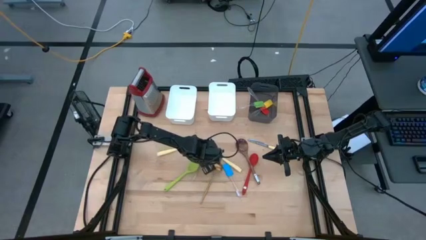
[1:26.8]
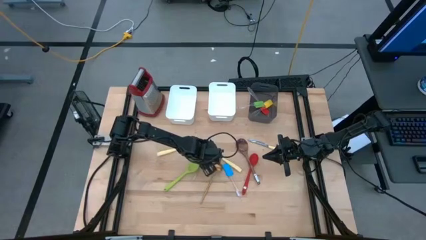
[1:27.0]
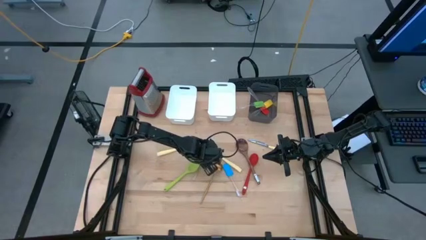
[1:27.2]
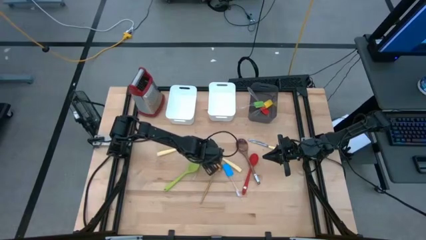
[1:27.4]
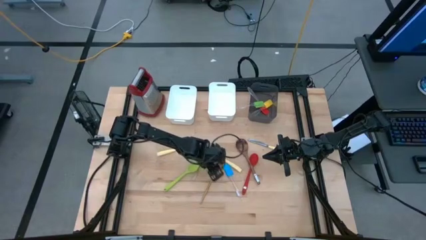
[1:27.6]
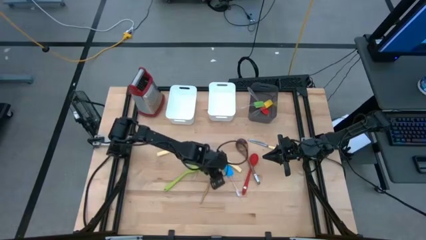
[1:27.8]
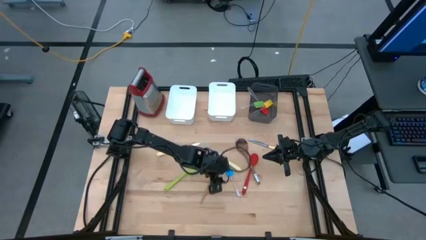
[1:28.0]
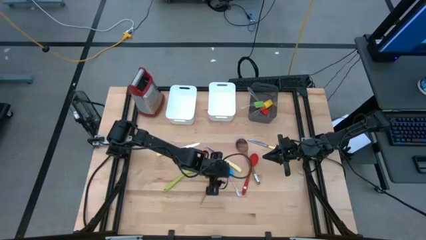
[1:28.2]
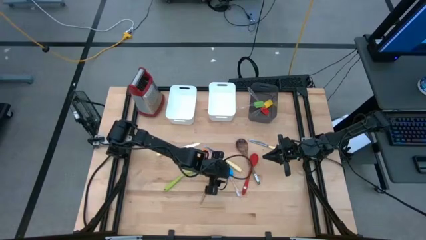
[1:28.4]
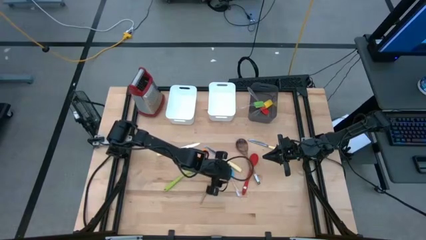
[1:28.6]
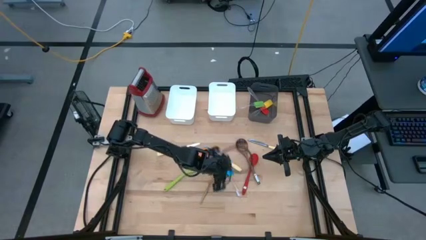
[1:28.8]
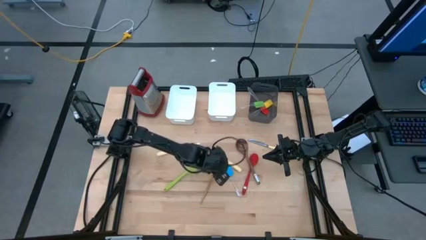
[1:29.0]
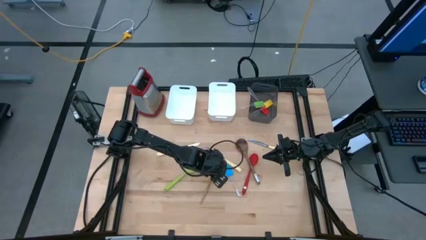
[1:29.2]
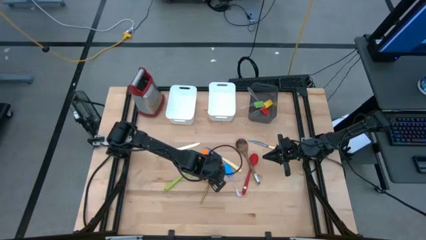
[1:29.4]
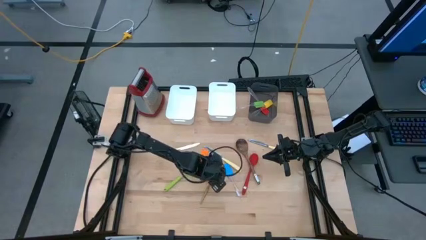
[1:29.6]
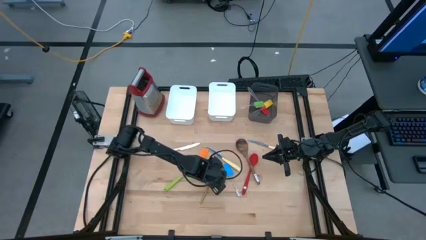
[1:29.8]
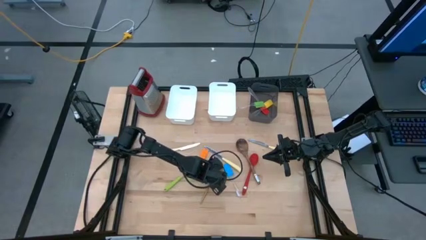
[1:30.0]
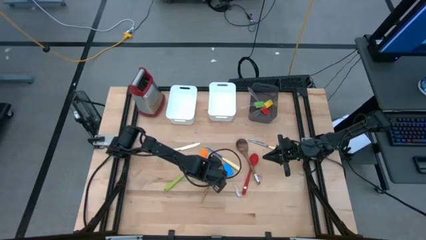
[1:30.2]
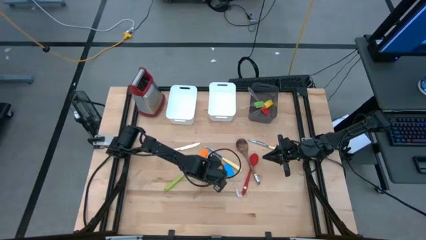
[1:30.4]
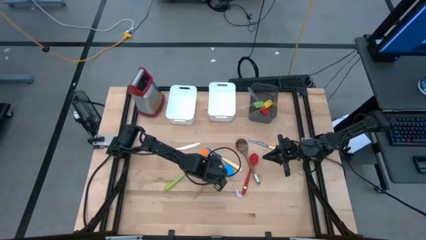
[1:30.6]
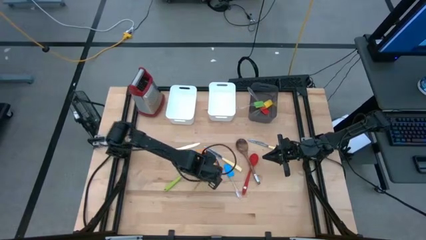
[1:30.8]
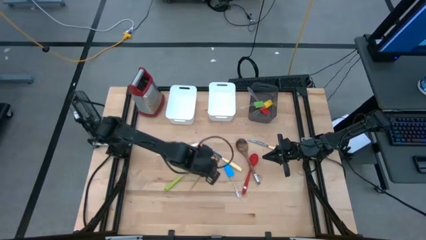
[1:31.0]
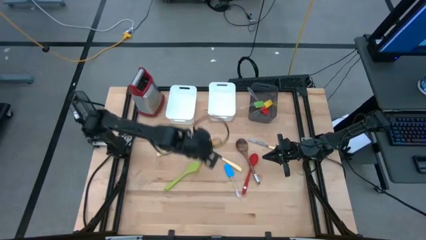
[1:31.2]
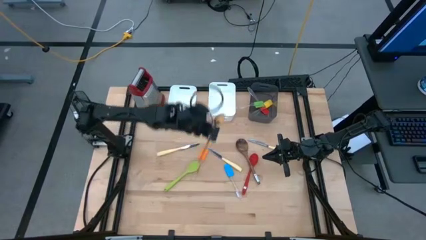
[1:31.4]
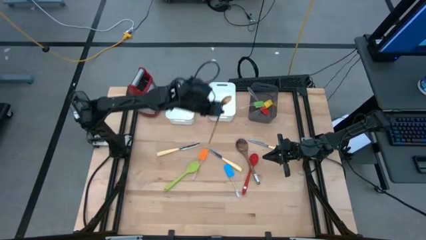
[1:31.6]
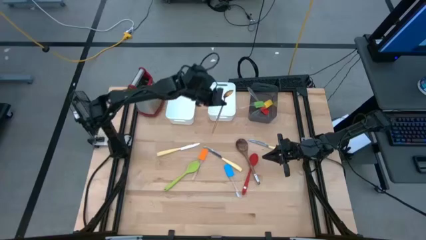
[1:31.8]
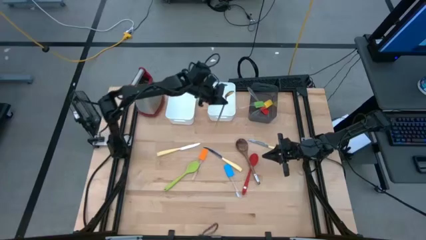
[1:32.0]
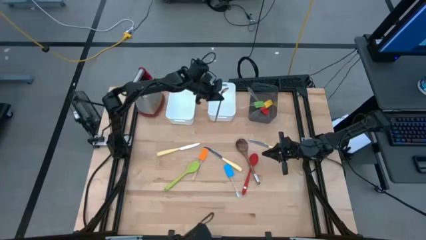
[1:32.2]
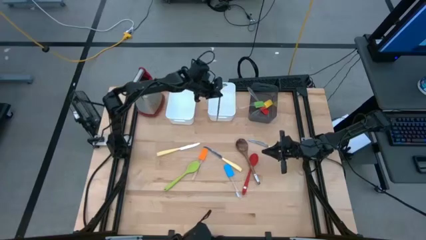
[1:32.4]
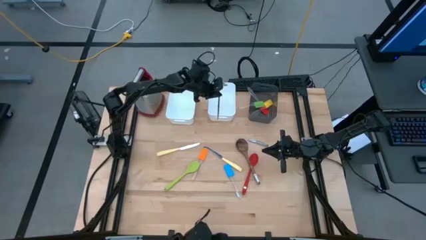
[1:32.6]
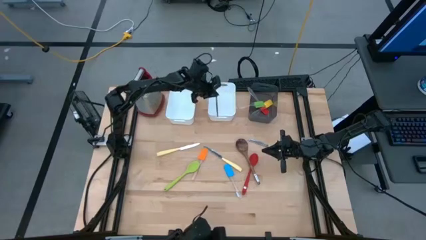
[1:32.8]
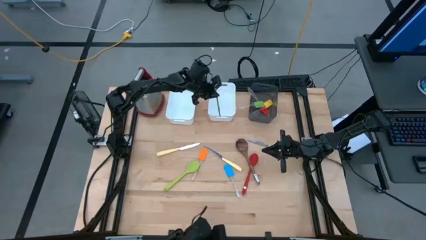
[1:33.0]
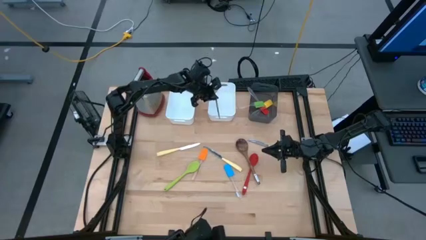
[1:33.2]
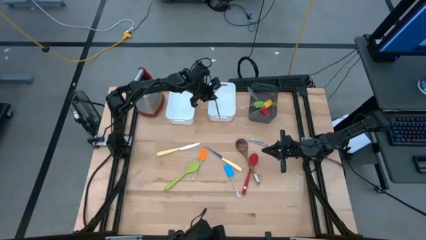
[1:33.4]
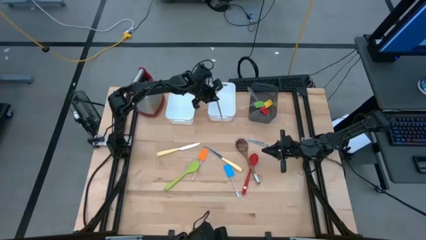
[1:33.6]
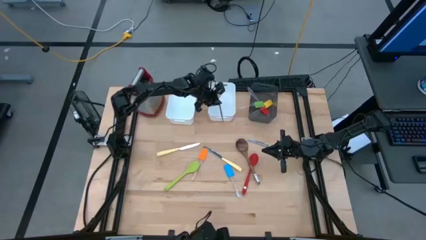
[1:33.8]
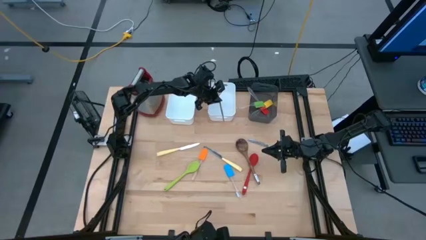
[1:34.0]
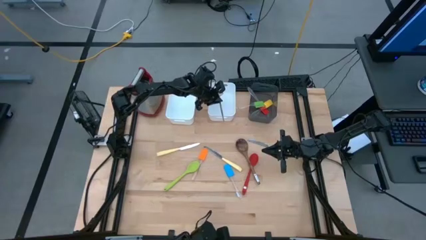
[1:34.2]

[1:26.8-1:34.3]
Task: Pick & Place Kitchen Items
Put the gold serving spoon into the right white bin

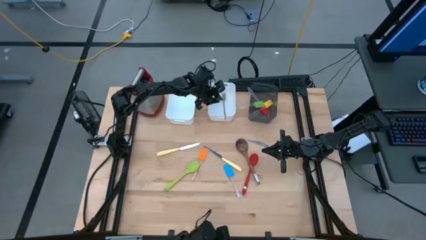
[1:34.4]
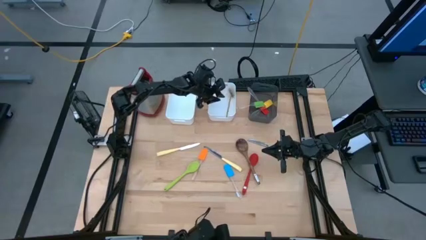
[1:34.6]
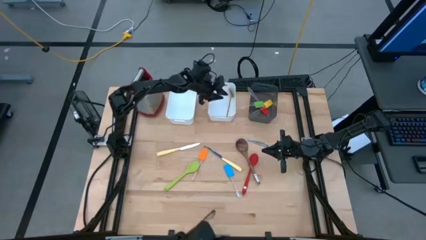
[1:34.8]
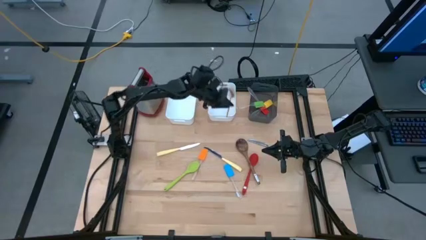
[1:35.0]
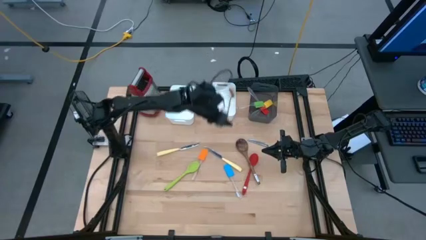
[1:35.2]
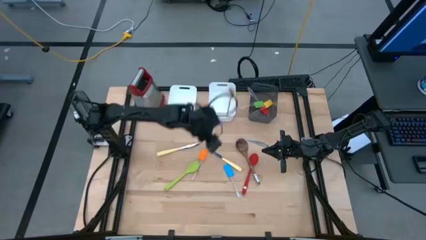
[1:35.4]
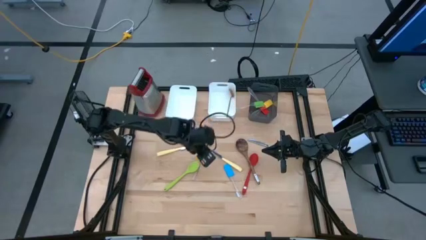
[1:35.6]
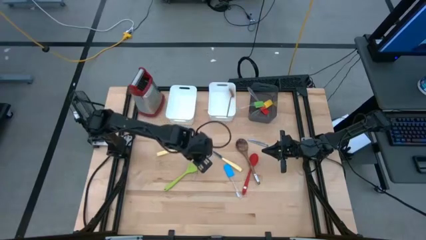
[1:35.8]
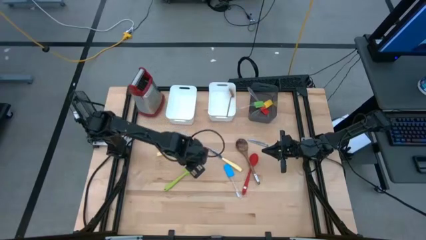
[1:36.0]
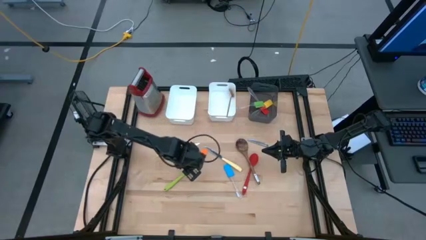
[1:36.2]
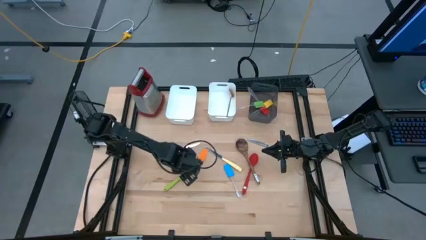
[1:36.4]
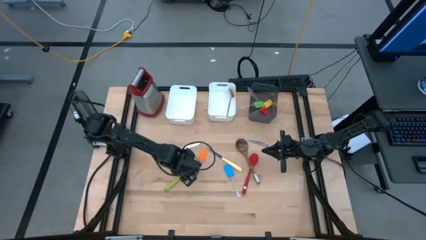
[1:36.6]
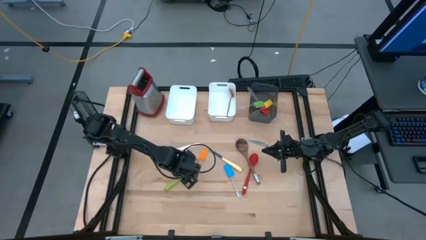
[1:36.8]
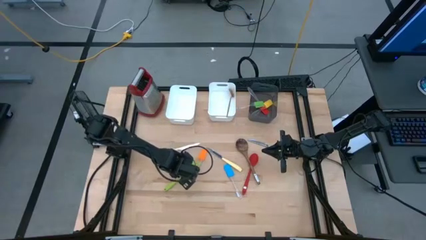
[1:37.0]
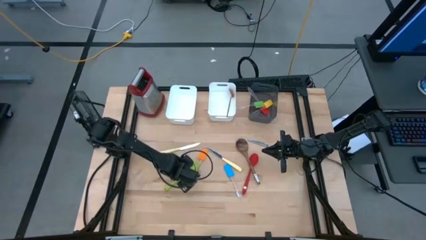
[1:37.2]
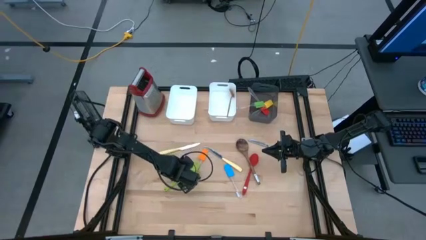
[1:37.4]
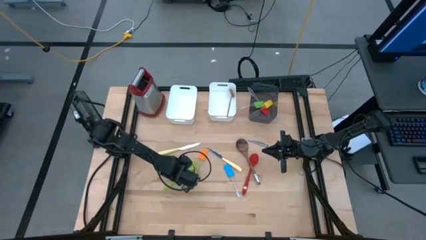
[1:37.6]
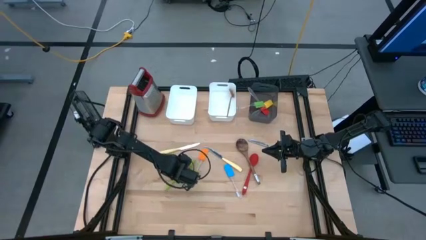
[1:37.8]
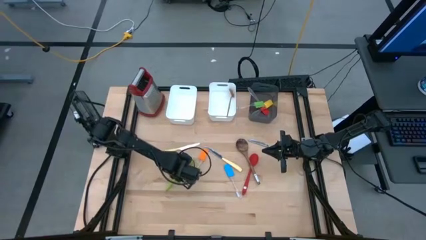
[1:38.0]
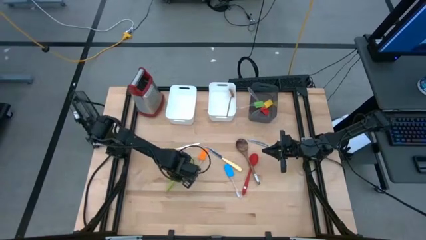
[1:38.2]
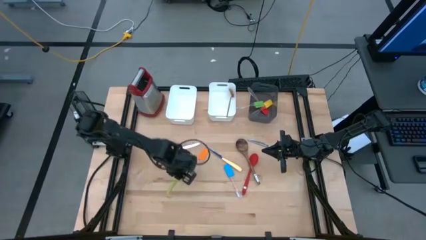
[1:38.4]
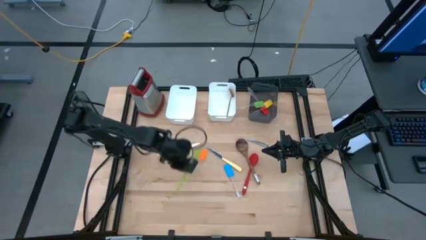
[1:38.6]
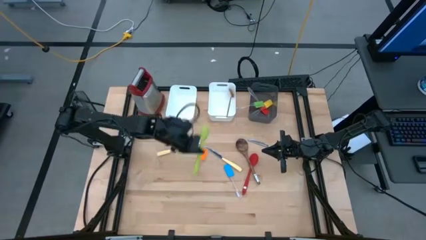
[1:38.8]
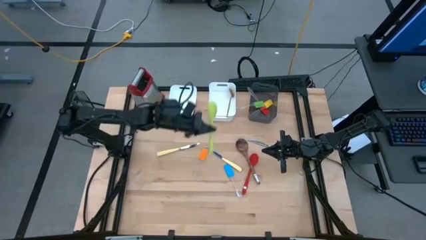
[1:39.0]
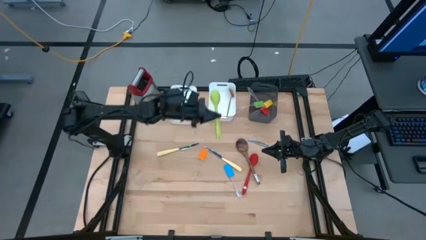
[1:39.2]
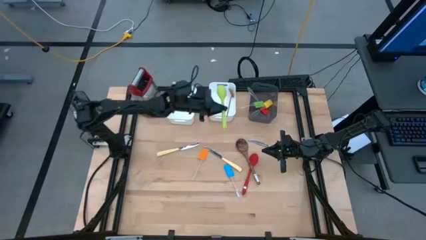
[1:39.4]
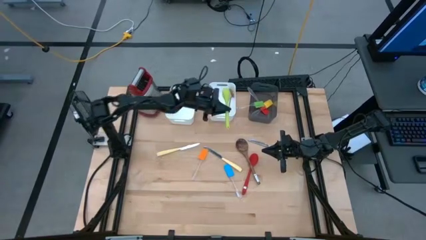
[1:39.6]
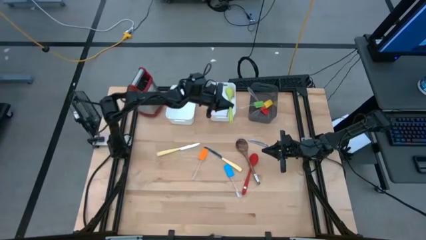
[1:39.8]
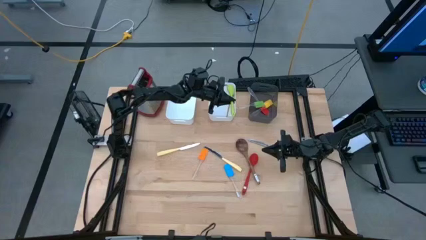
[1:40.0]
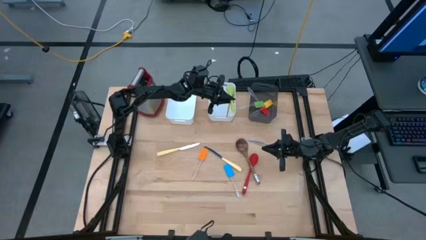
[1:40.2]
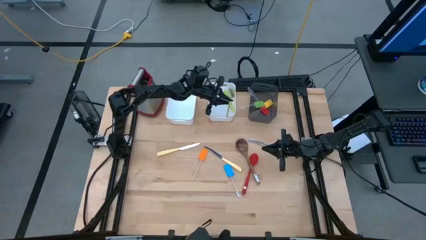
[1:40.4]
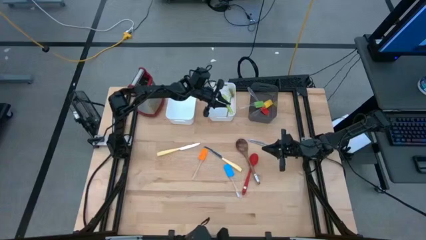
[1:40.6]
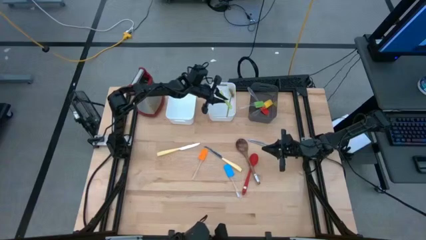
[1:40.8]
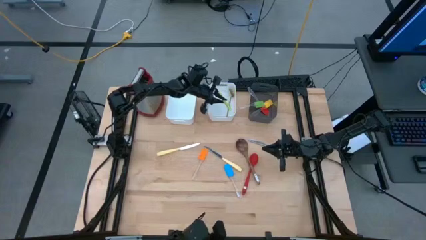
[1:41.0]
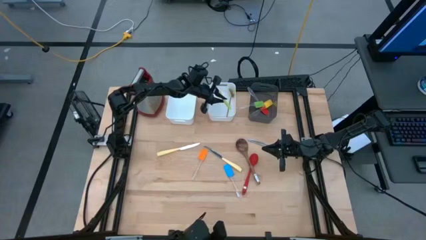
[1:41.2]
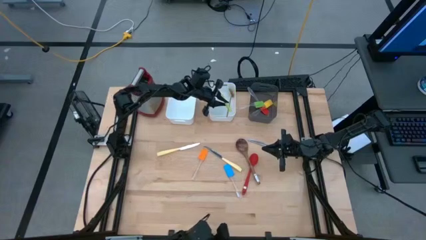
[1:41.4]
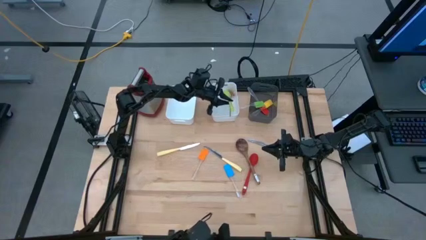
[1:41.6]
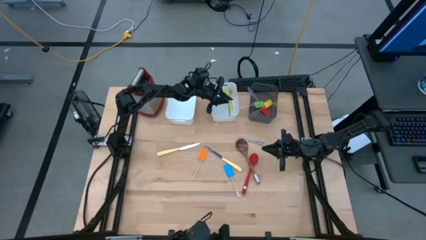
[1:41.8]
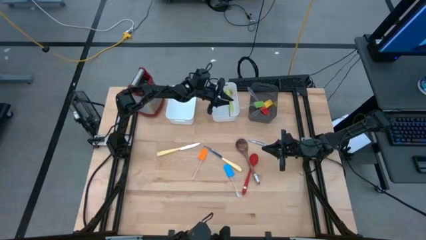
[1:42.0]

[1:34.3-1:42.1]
Put the green serving spoon into the right white bin
